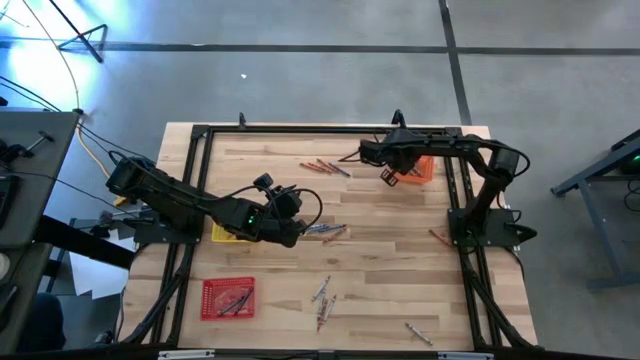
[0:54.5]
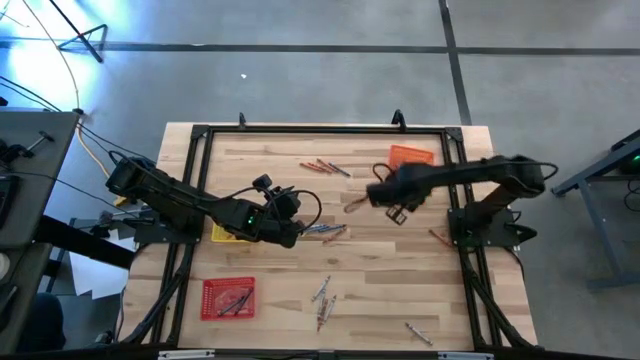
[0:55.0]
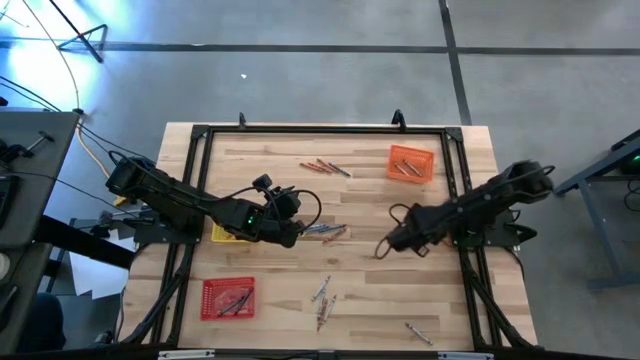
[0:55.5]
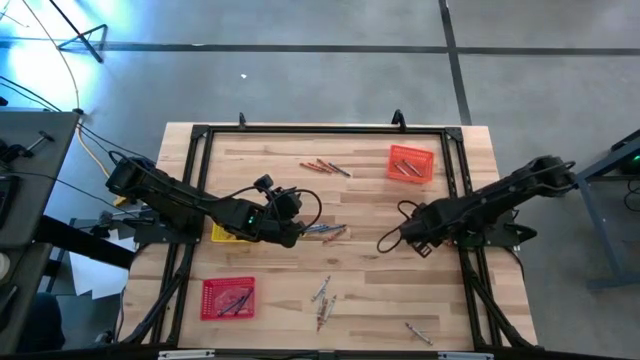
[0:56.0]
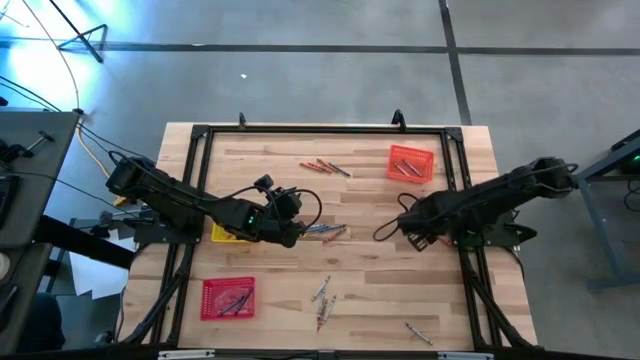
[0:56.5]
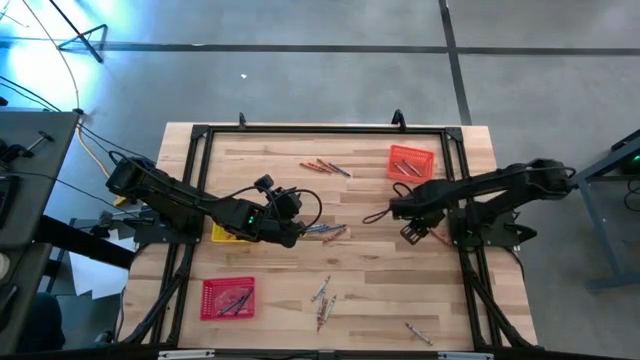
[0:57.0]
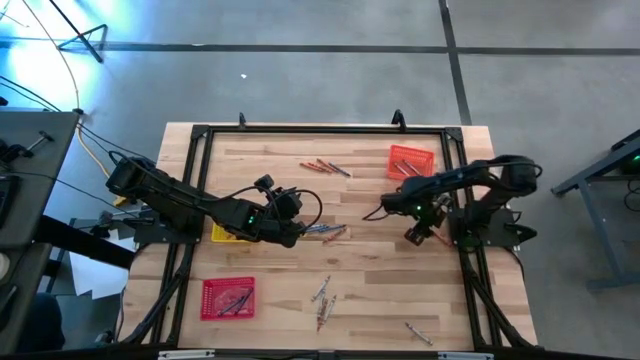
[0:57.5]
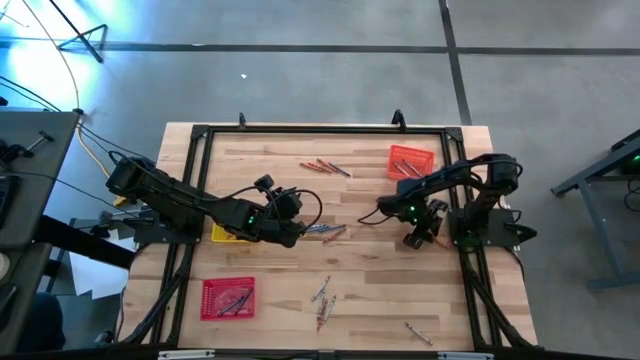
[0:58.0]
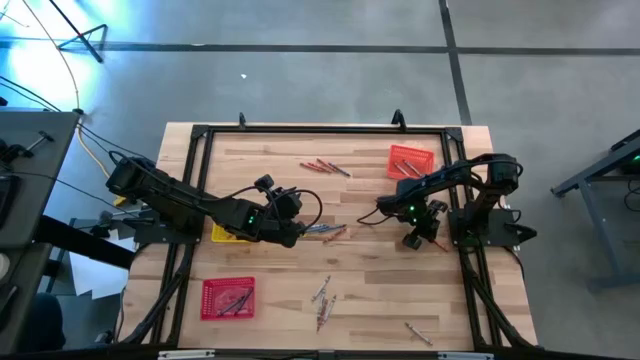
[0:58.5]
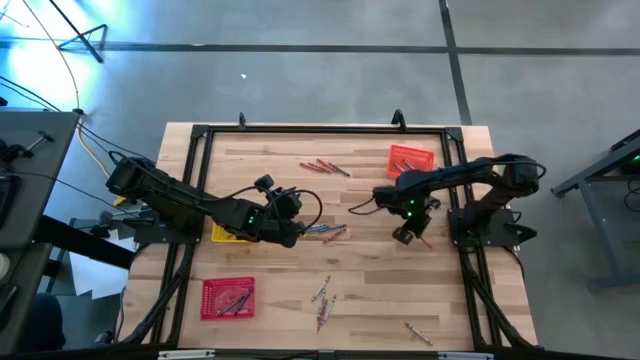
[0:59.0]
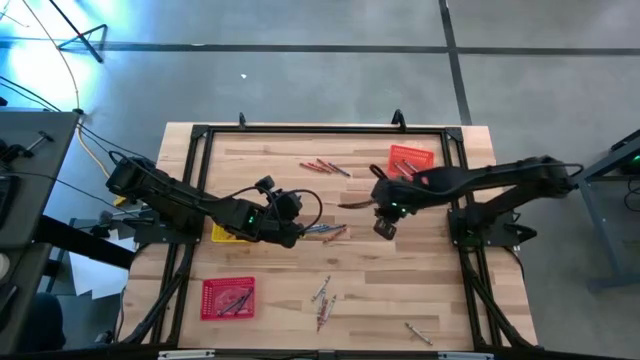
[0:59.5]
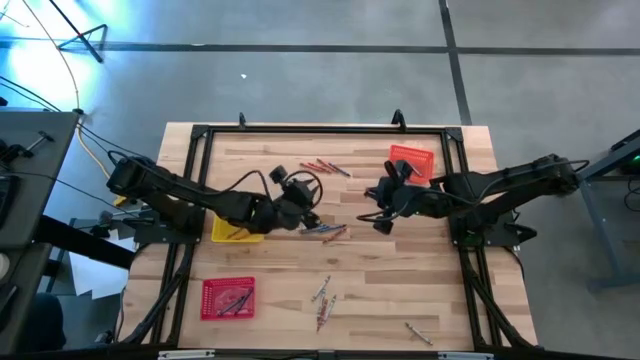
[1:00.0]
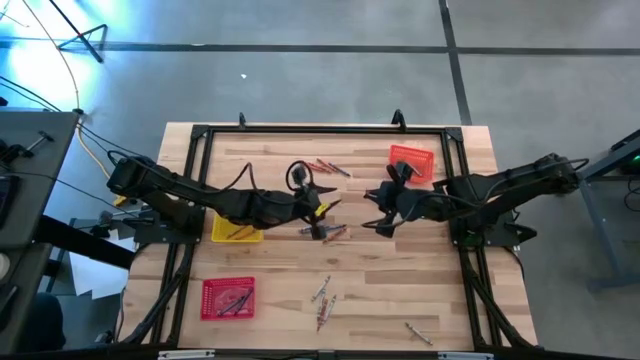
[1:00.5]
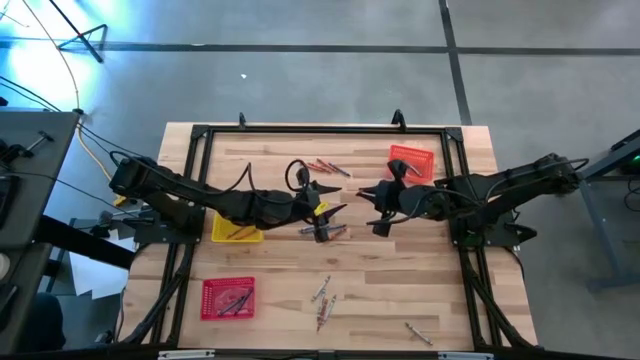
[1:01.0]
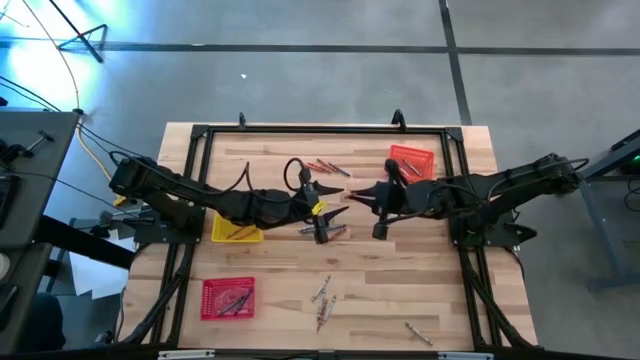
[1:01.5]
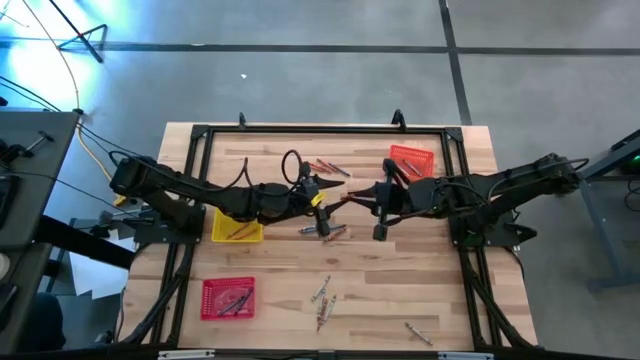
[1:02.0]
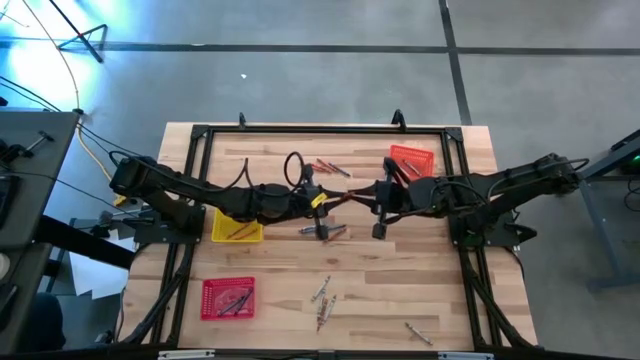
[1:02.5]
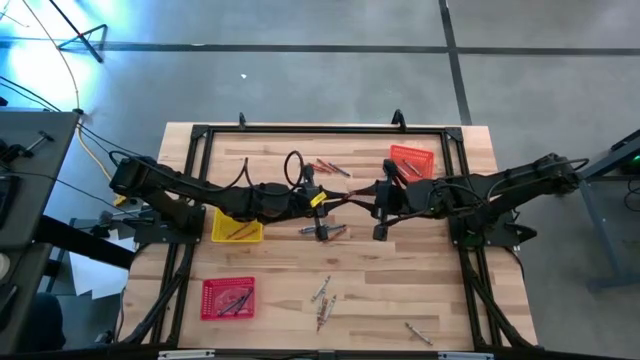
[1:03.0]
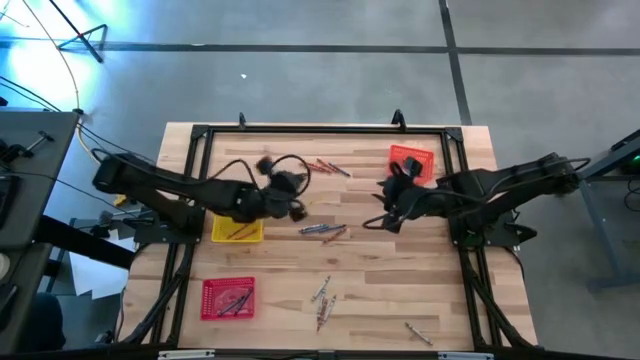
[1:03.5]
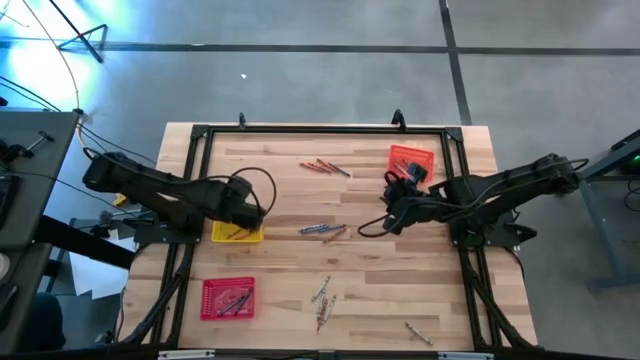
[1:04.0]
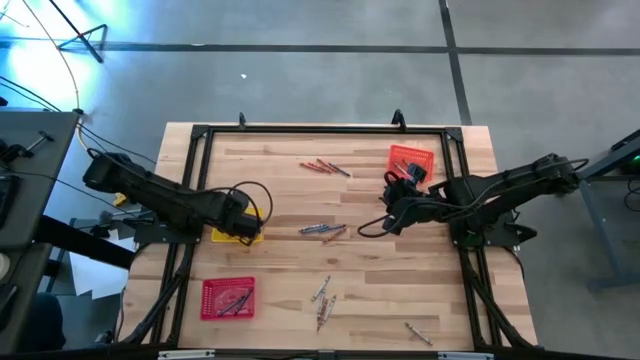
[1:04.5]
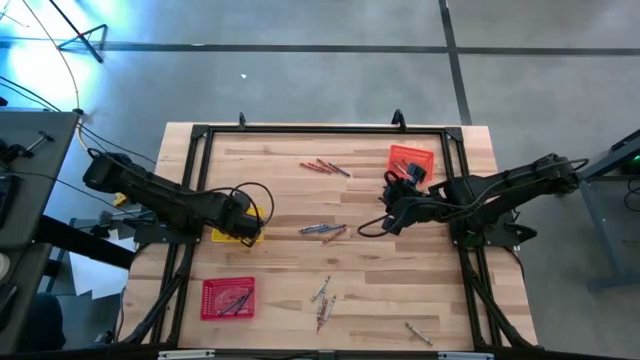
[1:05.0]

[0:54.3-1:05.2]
Task: Sort crayons
Put the orange crayon into the yellow bin

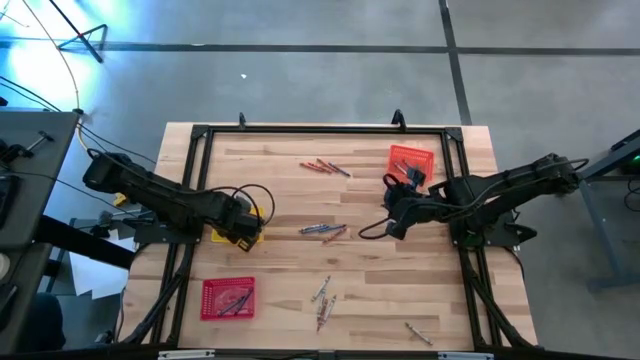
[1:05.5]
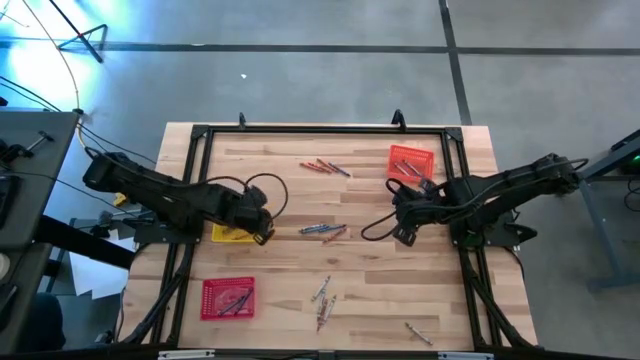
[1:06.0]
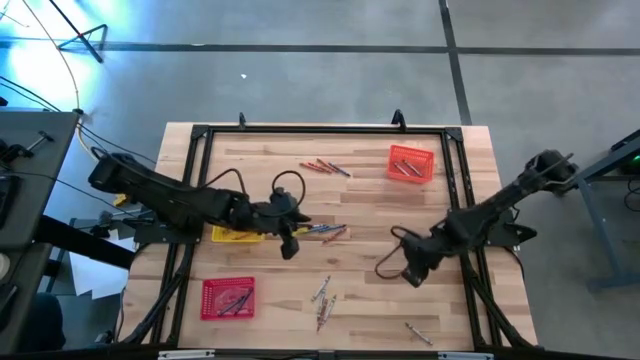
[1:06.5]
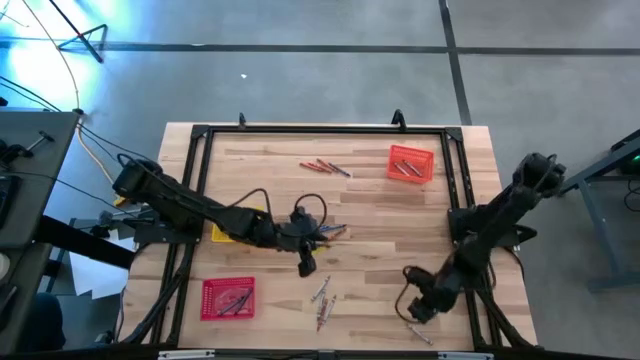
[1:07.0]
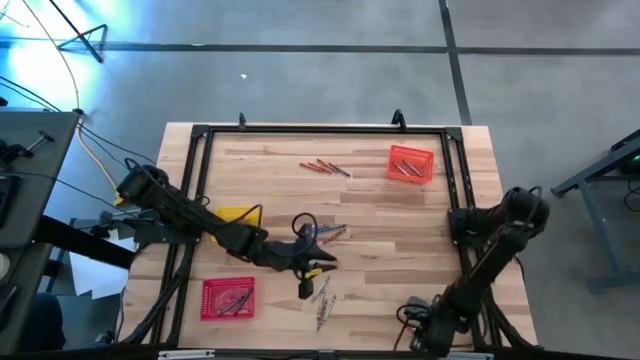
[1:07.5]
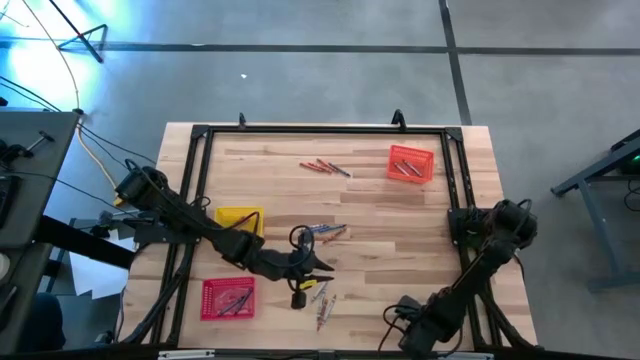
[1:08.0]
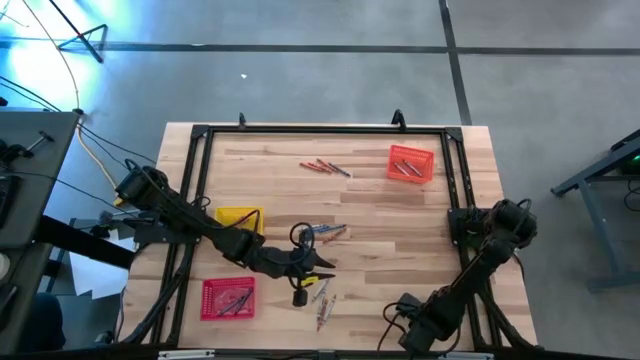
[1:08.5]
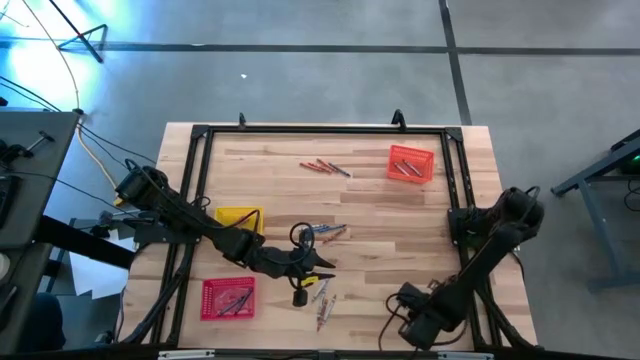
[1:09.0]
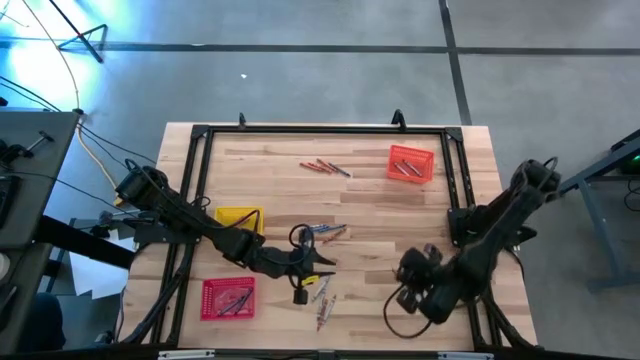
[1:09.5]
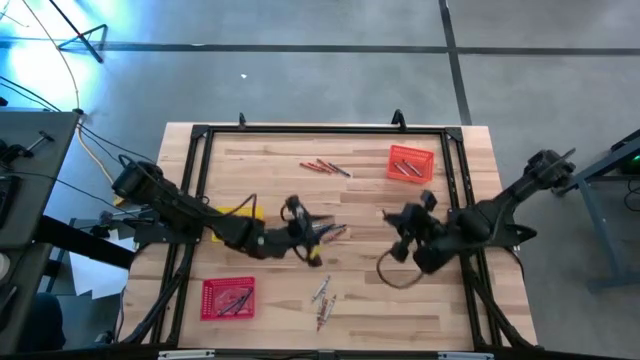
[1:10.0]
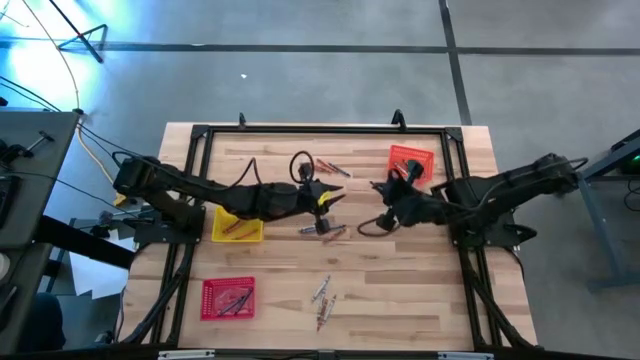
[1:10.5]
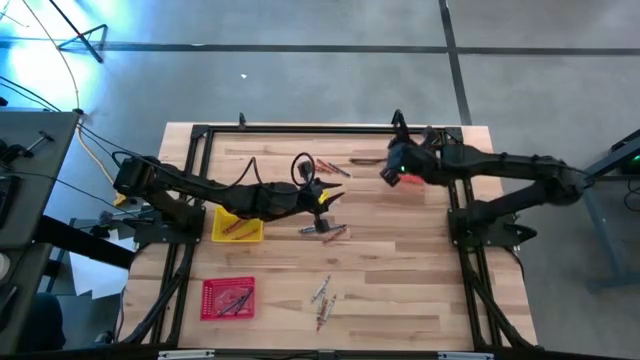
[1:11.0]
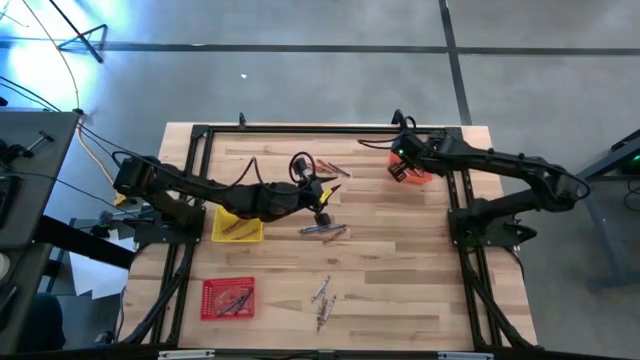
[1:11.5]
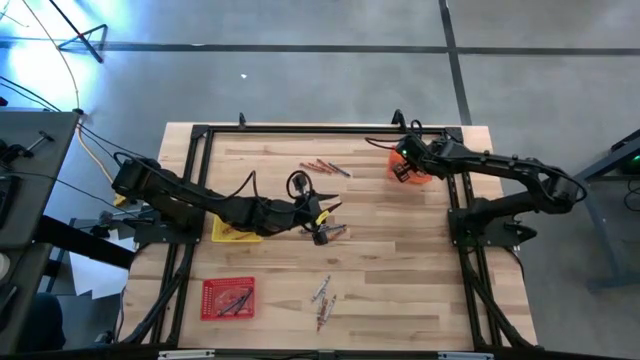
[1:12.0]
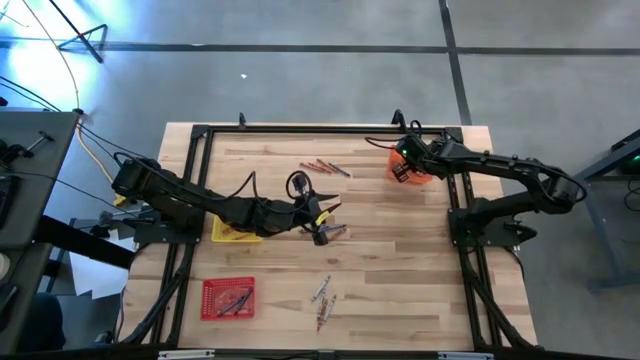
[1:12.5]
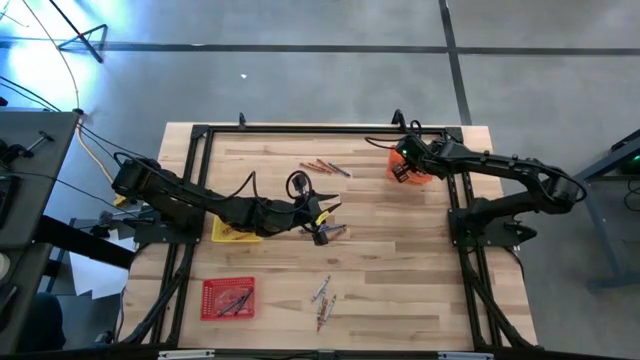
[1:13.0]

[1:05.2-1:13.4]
Put the gray crayon into the orange bin

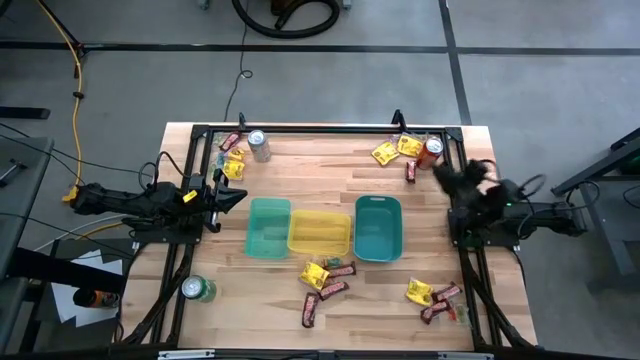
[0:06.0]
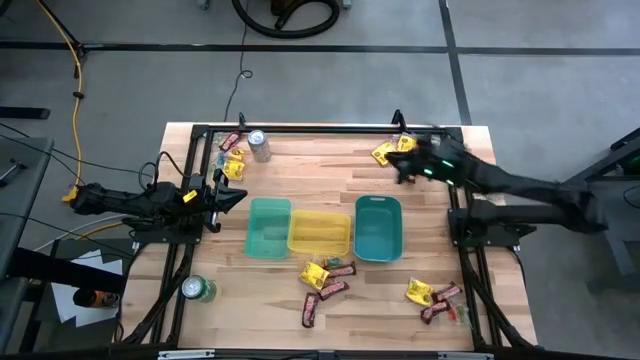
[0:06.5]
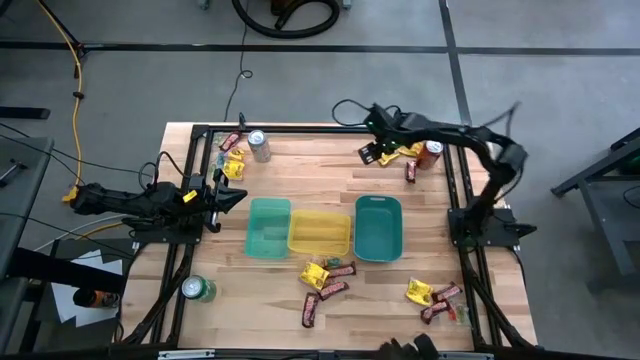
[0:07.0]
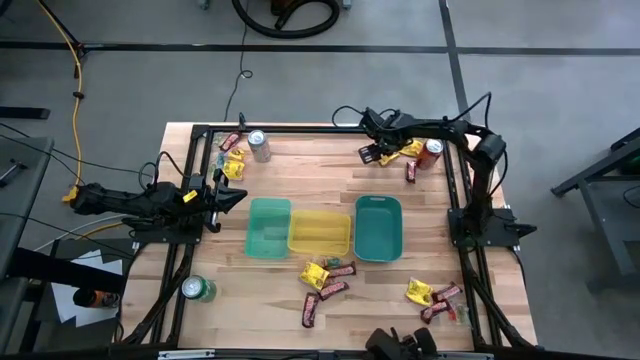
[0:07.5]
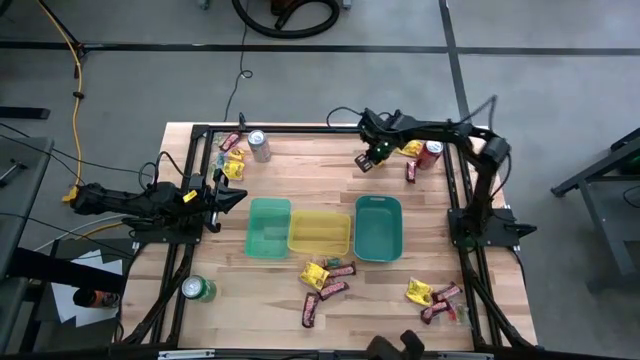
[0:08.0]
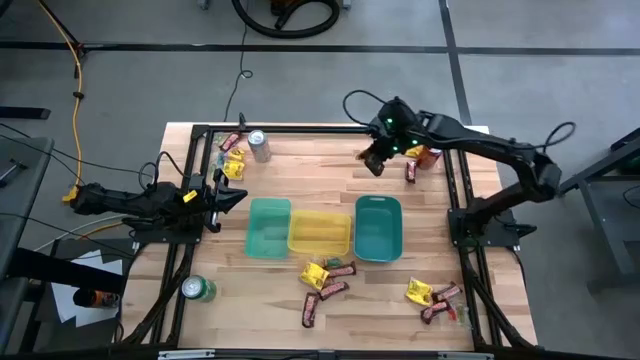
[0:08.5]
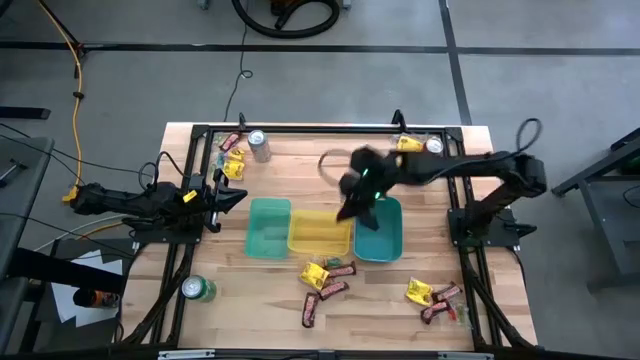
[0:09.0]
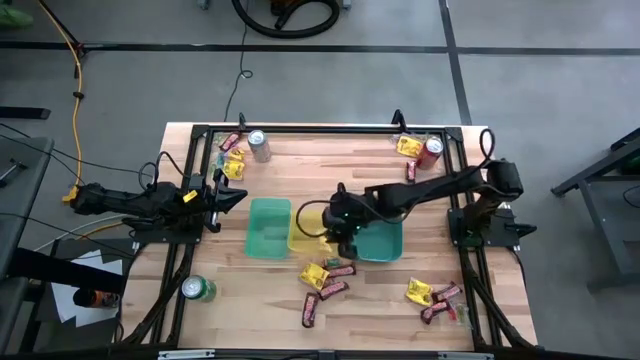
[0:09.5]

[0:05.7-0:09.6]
Task: Sort candy
Put the yellow candy into the yellow bin
